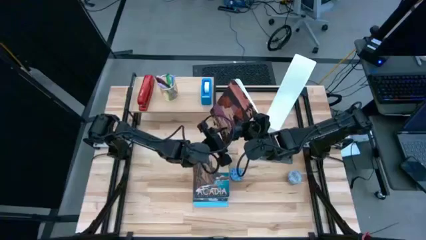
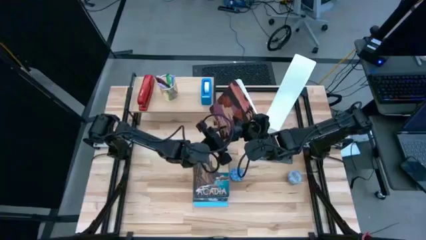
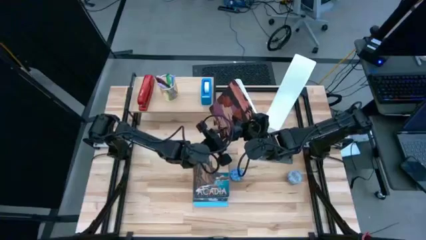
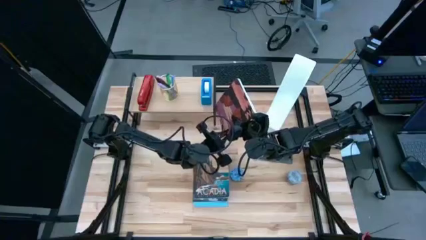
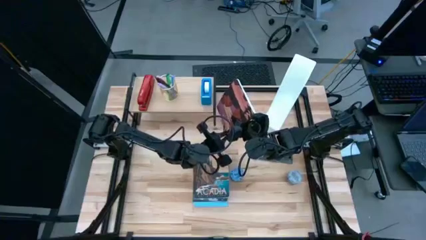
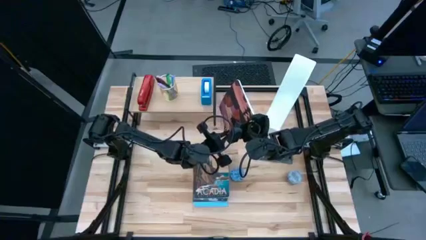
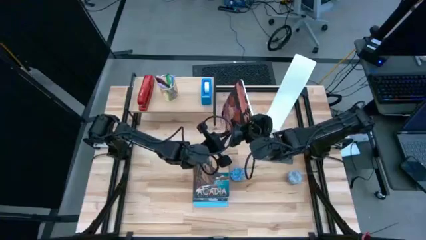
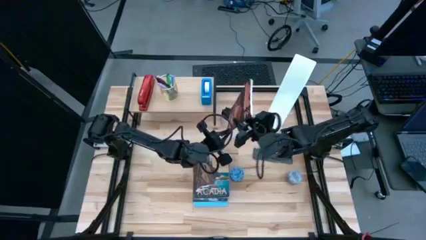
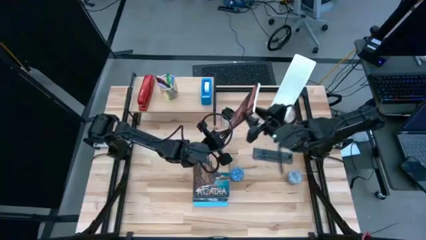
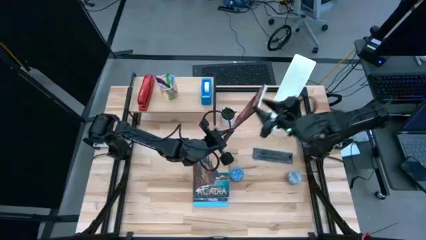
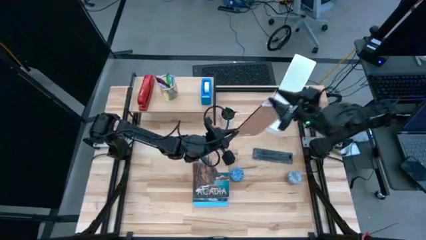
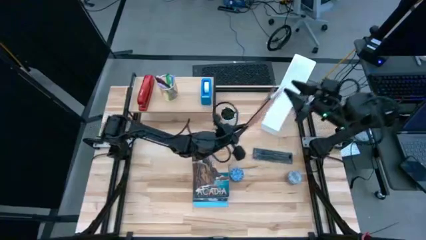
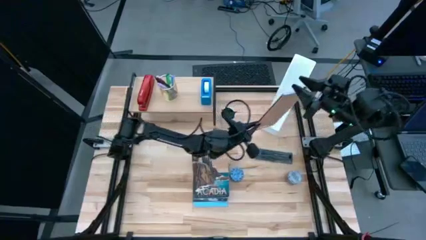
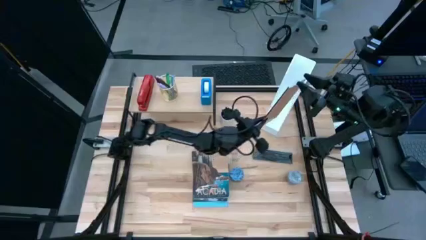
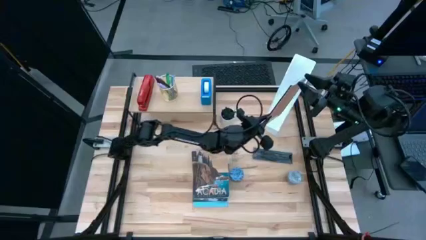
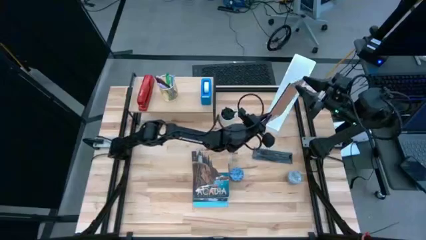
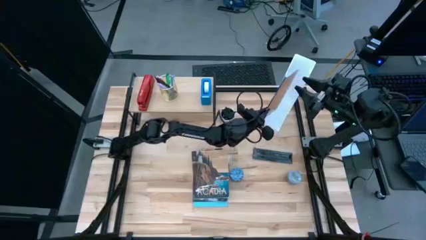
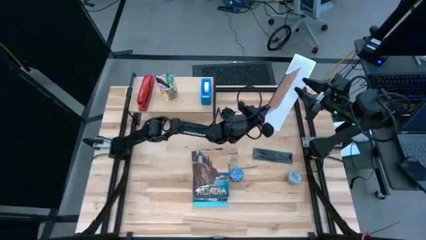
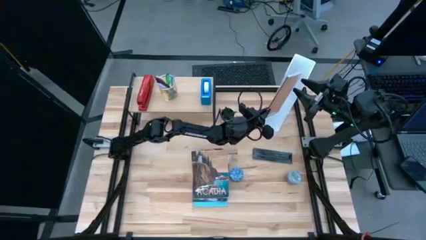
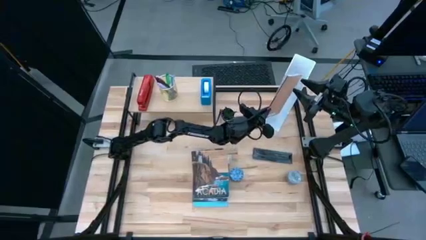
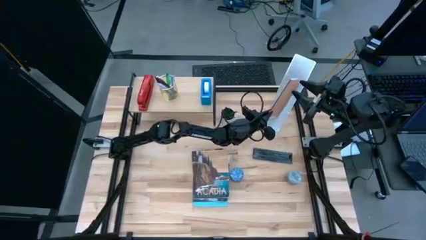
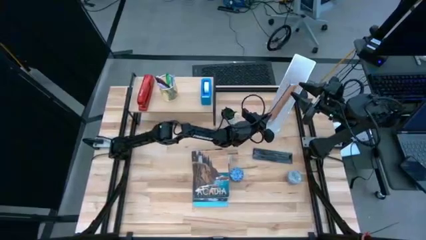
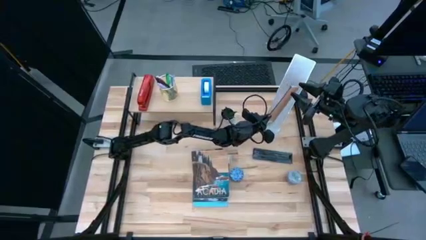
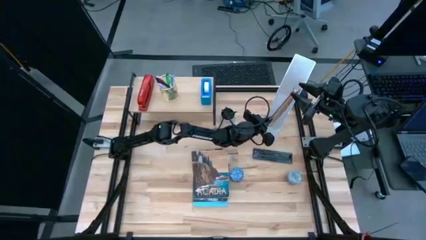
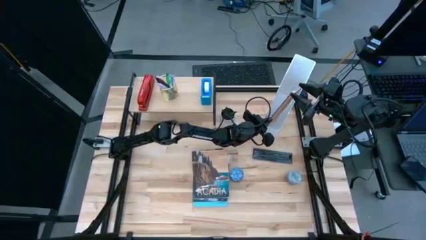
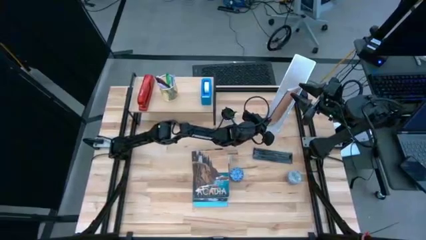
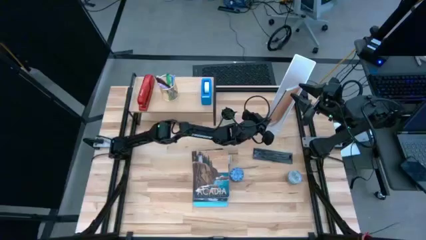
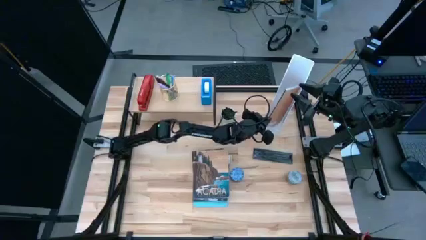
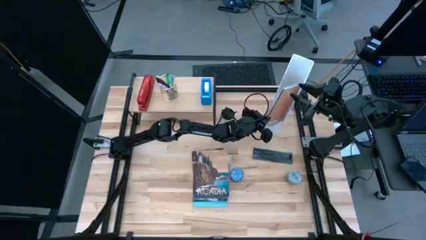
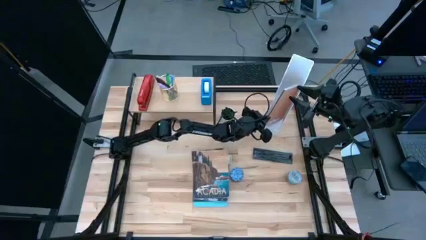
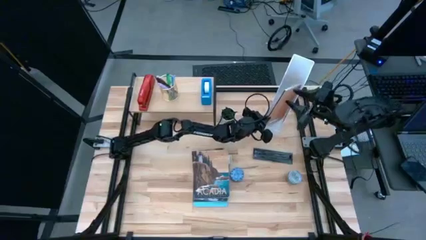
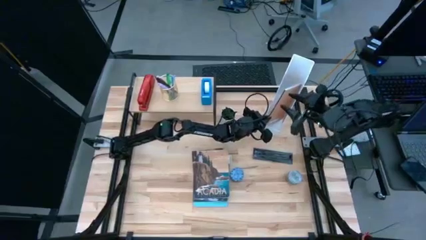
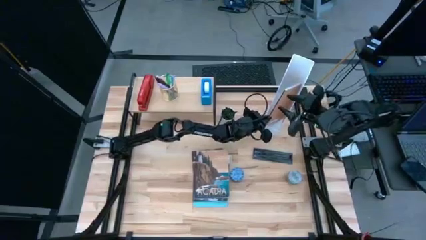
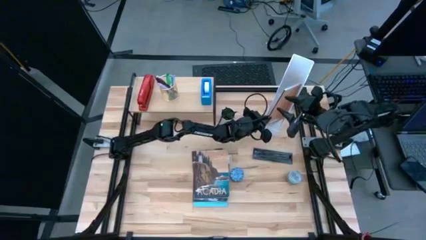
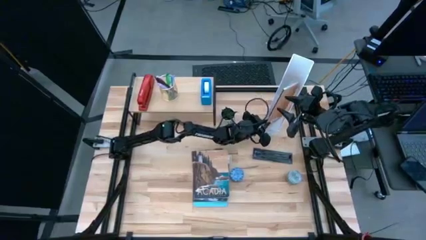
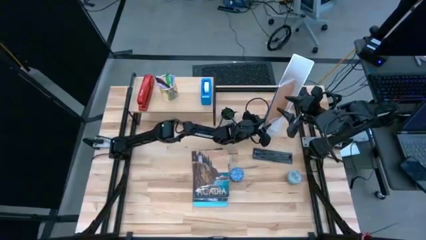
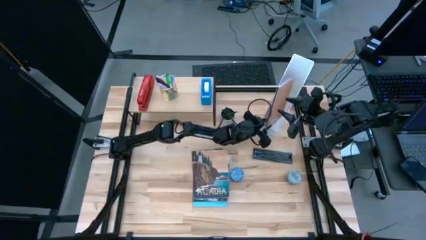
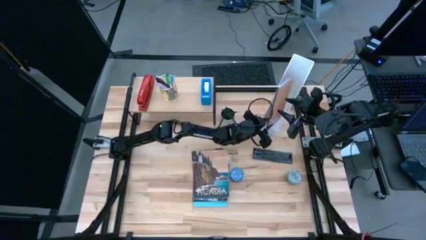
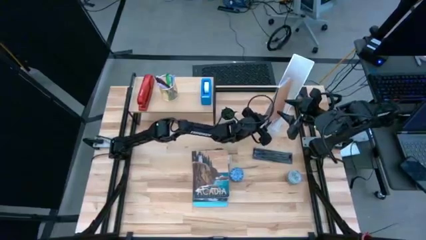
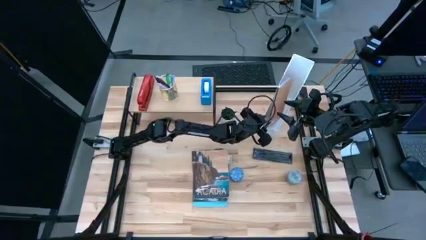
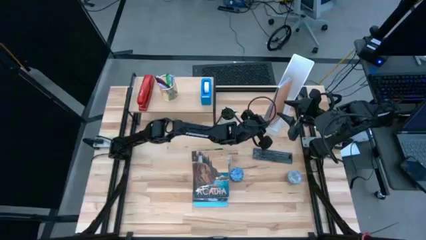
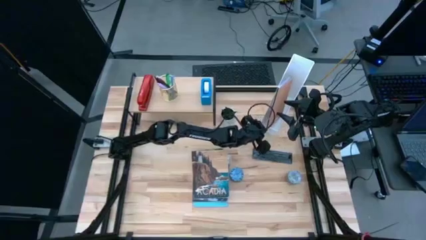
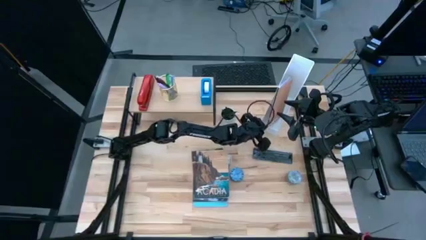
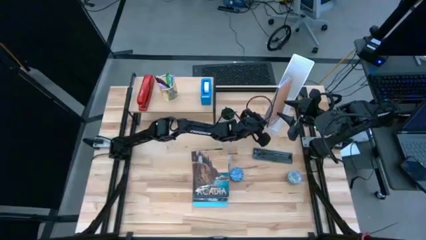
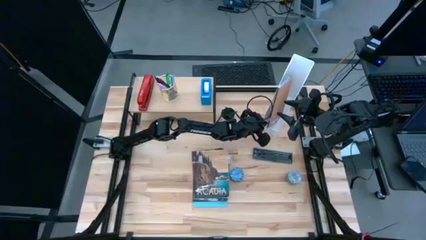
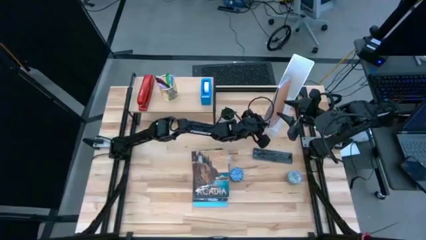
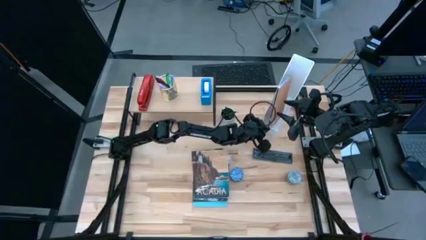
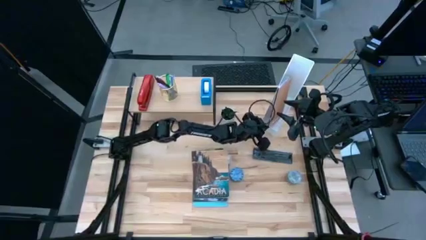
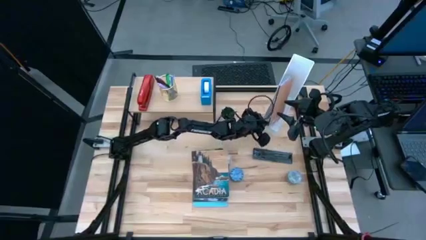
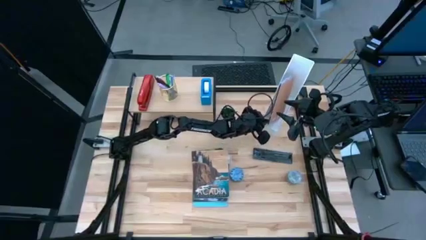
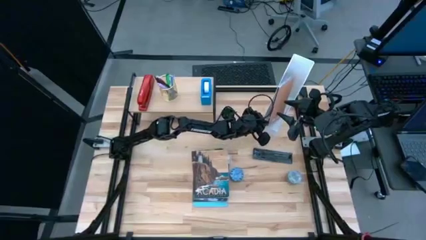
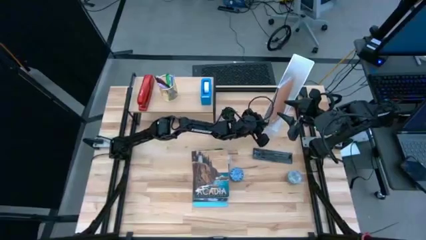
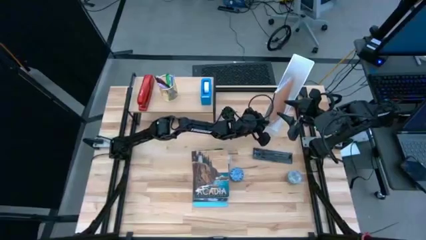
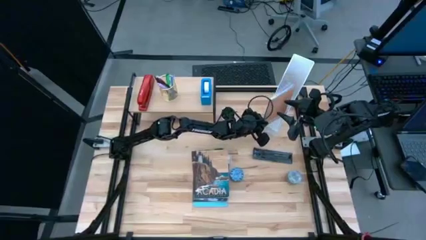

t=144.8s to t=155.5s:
Task: Stock shelves
Put the purple/brown book into the white book shelf

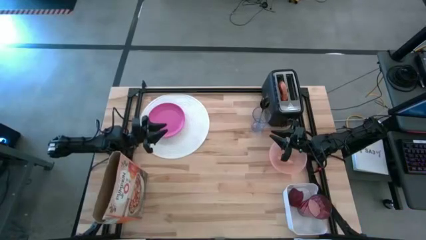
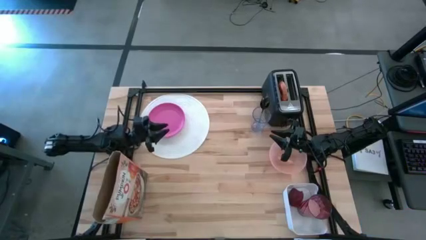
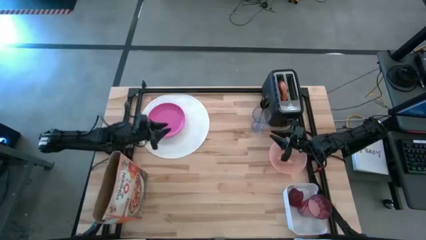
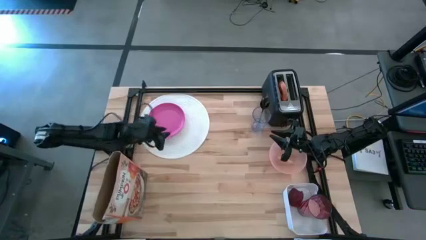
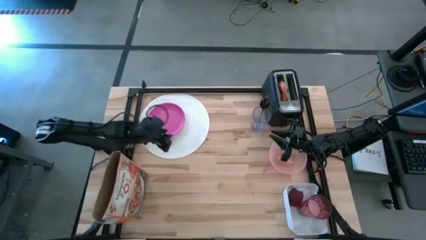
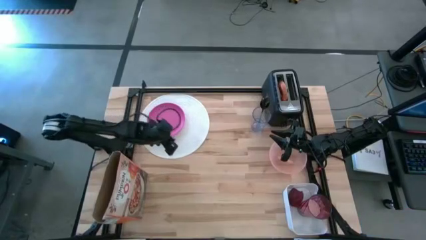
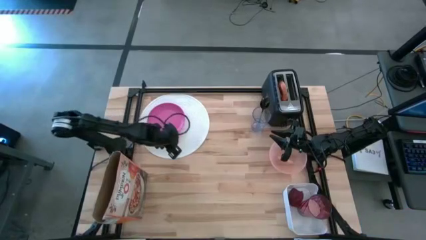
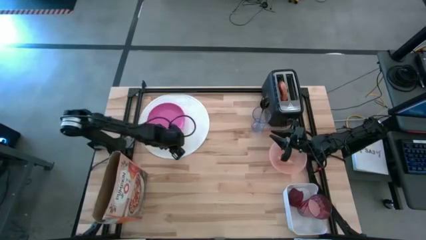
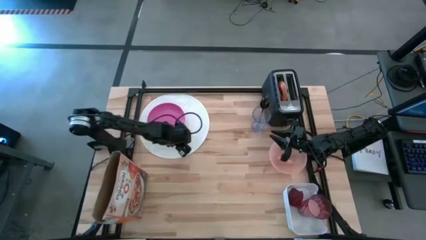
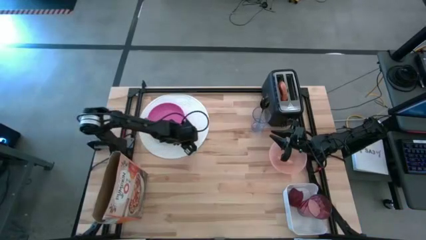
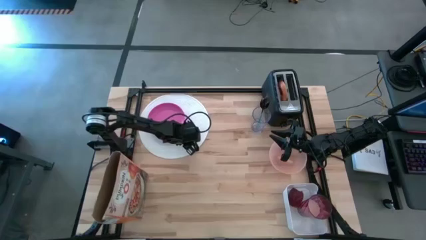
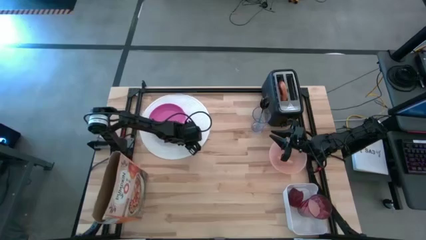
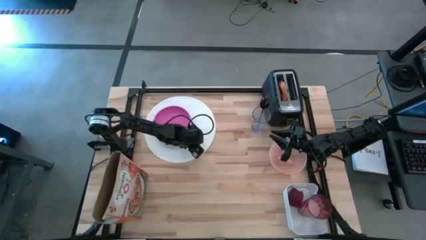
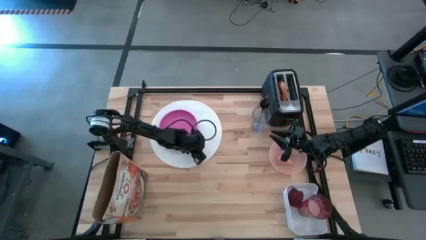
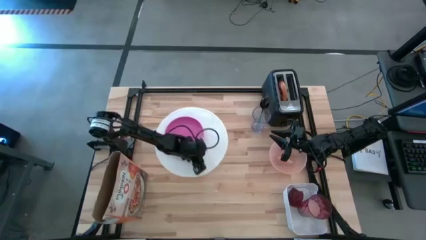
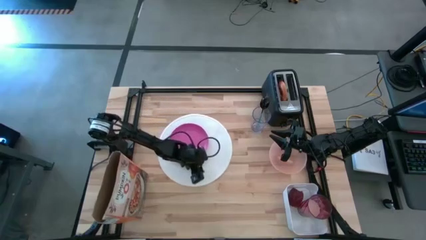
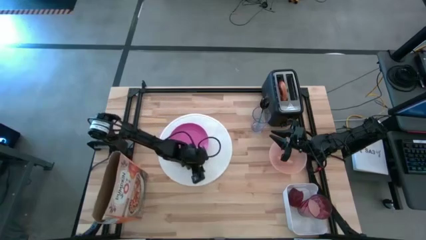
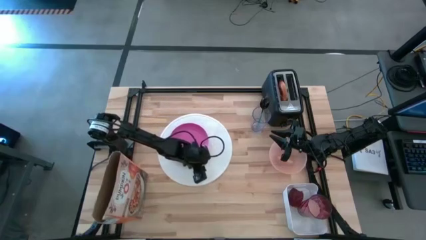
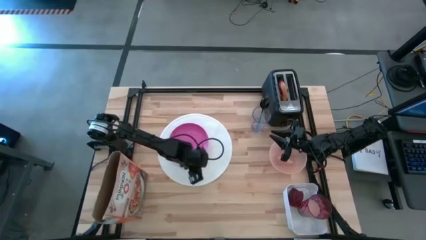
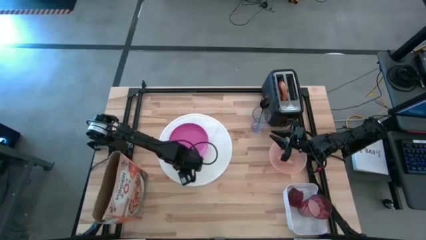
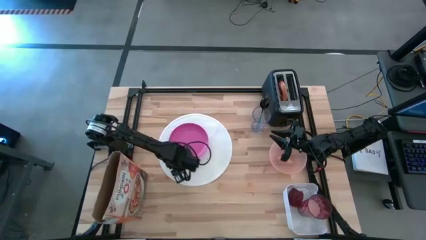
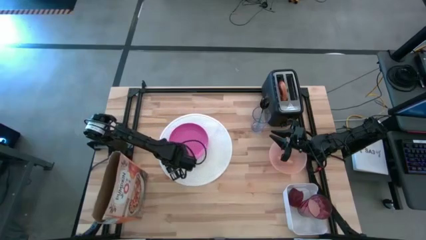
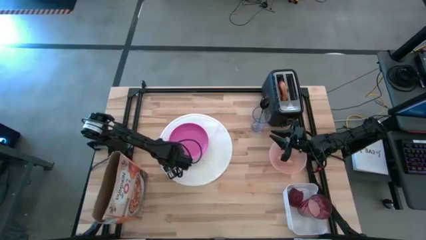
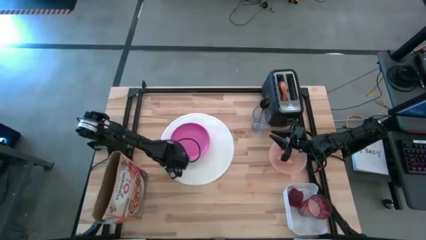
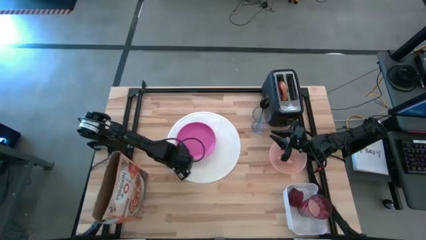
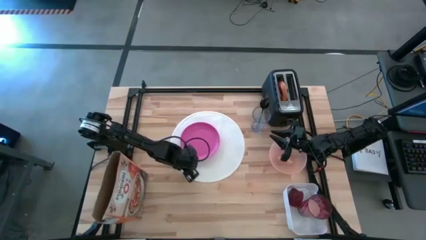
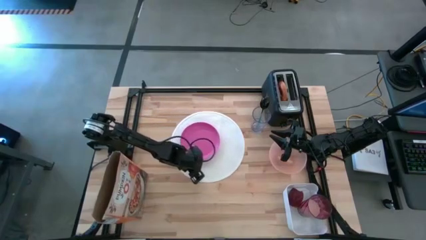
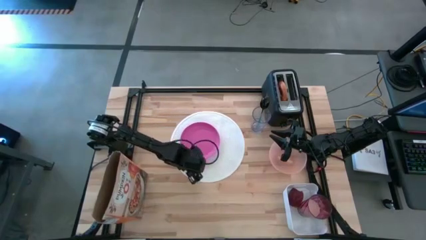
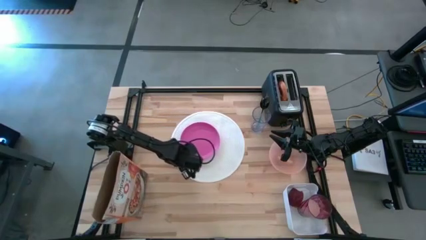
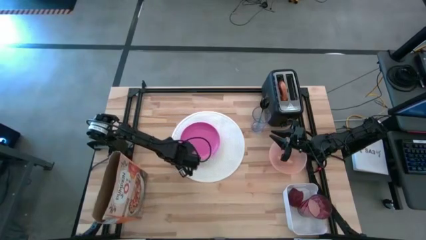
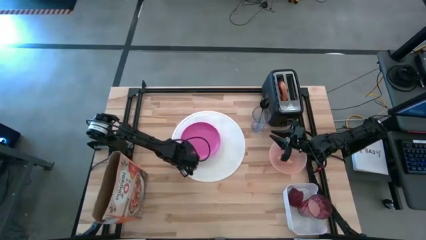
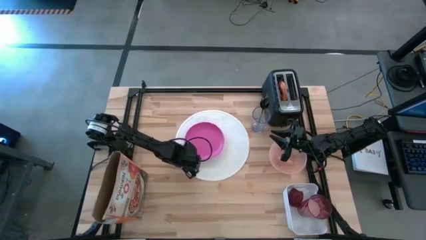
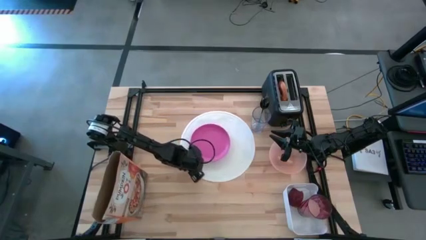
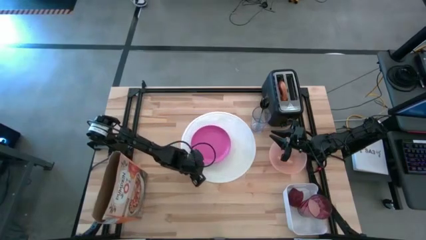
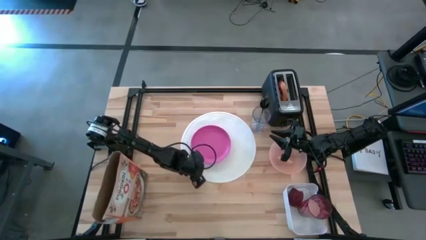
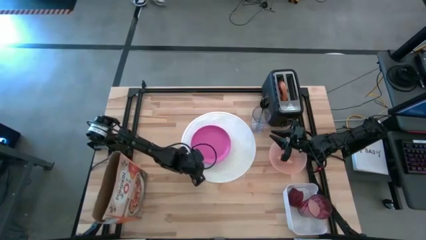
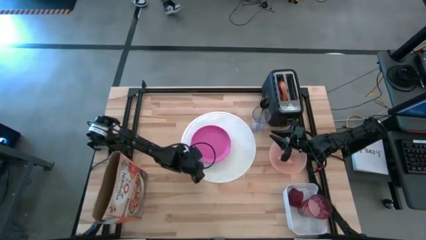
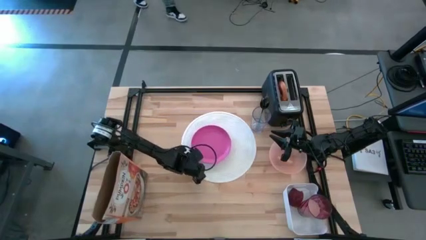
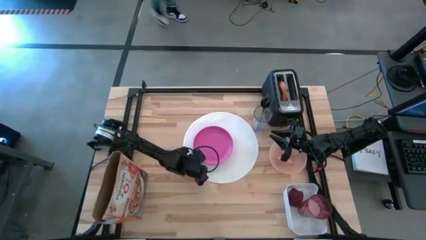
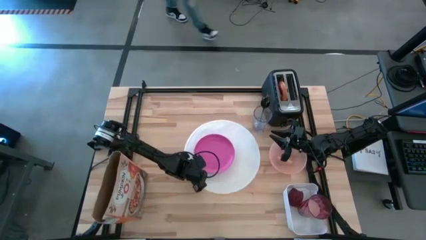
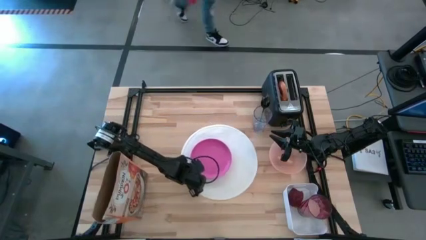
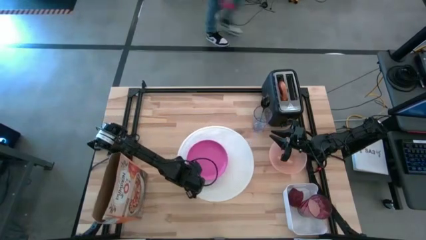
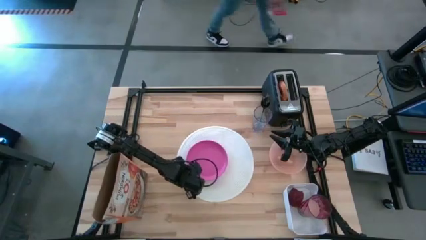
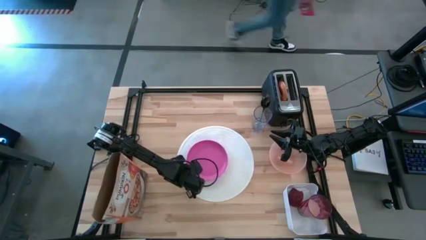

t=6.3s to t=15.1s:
Task: Arrange a breakfast setting
Move the white mat to the middle of the table
